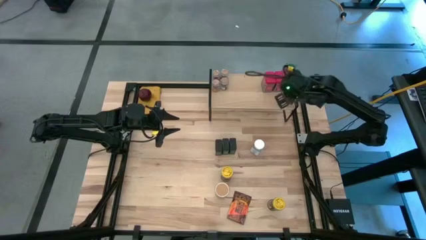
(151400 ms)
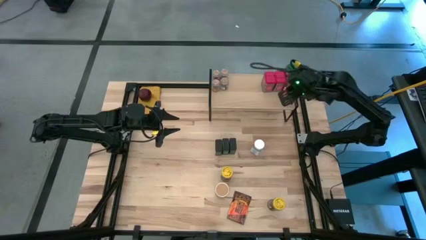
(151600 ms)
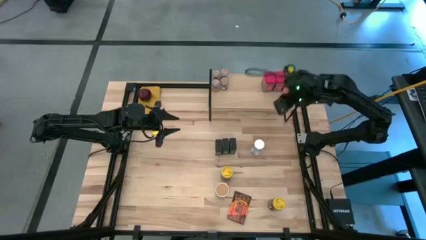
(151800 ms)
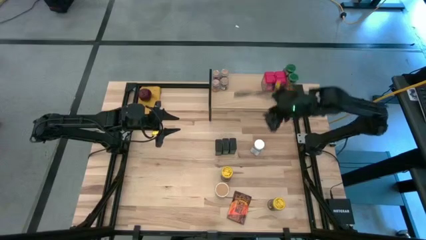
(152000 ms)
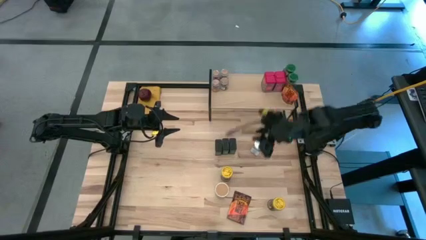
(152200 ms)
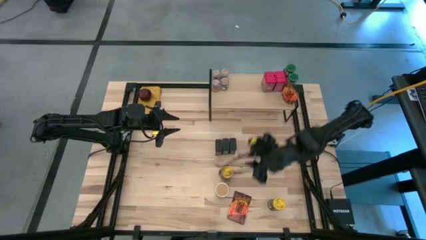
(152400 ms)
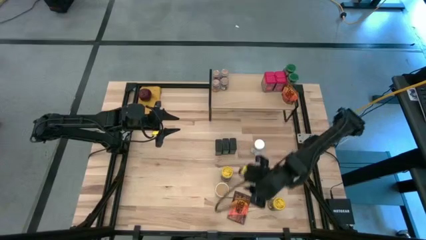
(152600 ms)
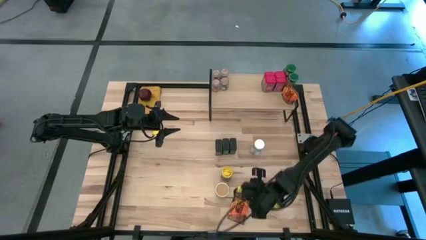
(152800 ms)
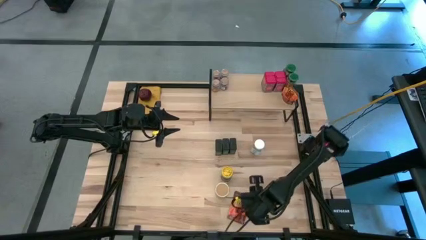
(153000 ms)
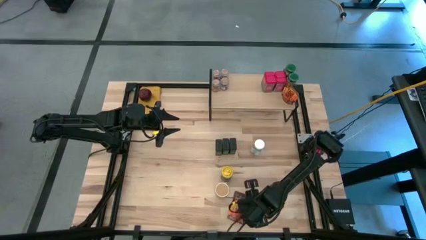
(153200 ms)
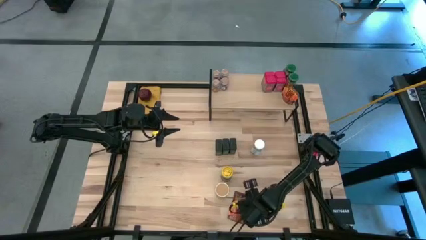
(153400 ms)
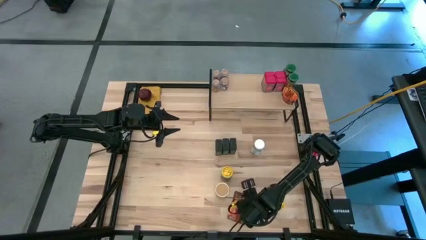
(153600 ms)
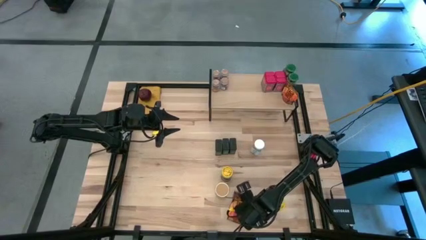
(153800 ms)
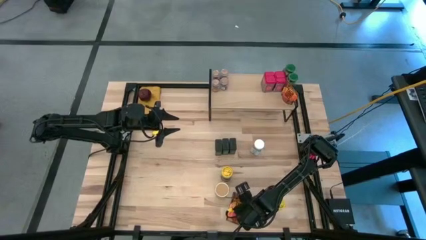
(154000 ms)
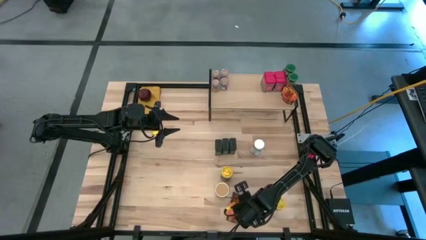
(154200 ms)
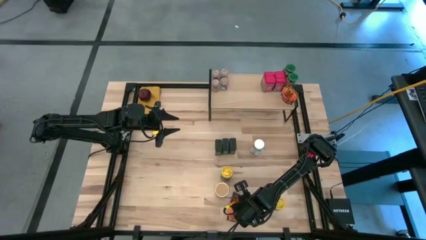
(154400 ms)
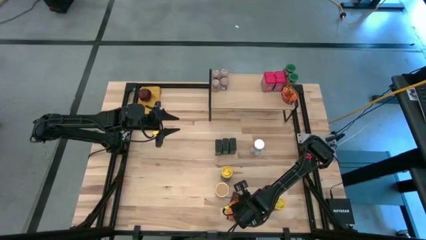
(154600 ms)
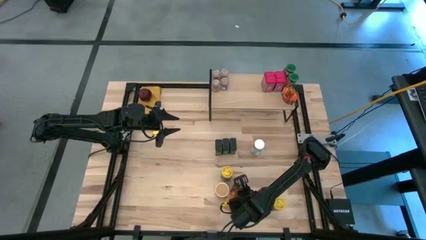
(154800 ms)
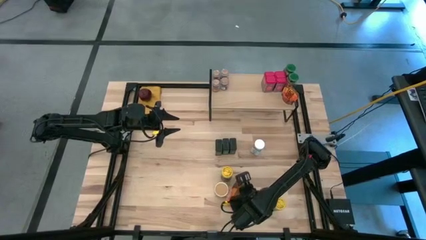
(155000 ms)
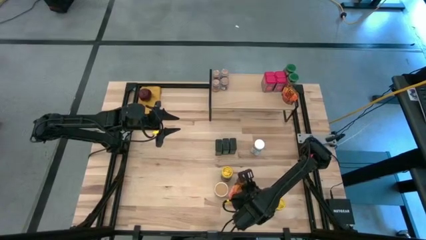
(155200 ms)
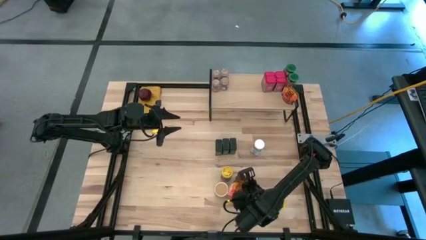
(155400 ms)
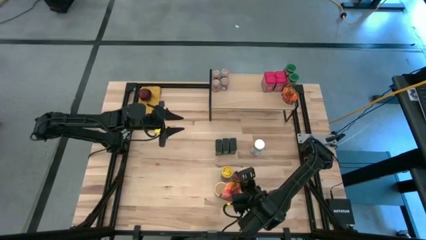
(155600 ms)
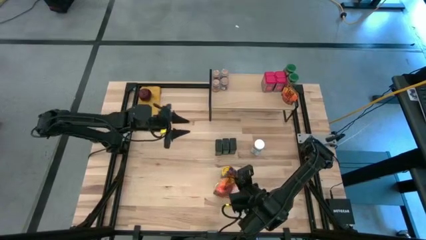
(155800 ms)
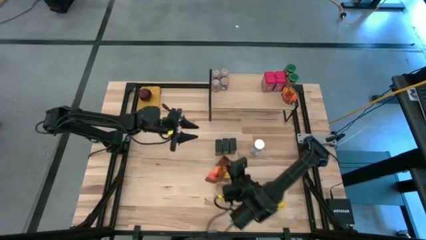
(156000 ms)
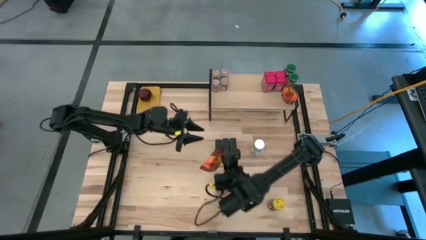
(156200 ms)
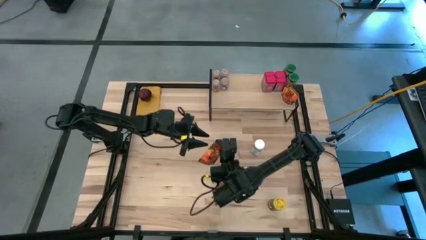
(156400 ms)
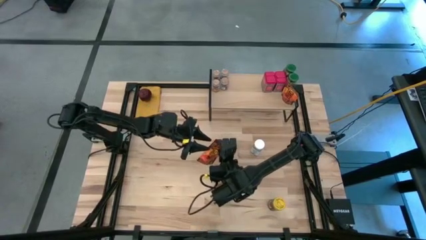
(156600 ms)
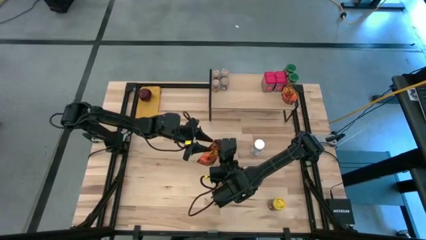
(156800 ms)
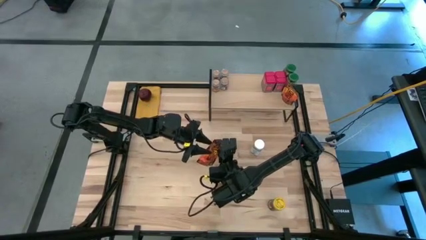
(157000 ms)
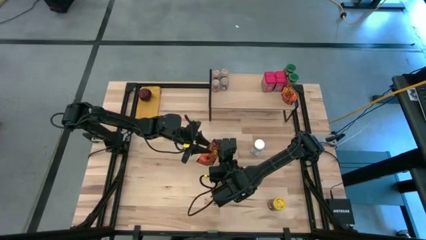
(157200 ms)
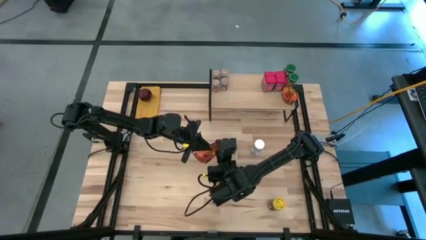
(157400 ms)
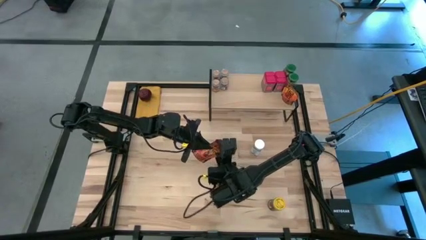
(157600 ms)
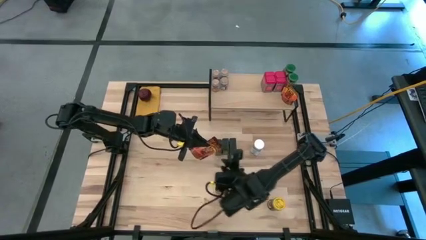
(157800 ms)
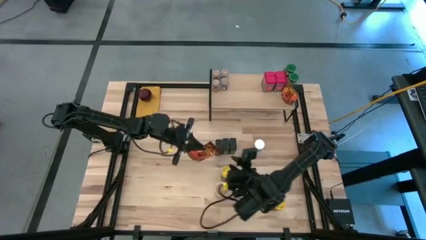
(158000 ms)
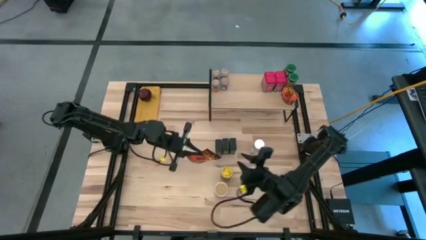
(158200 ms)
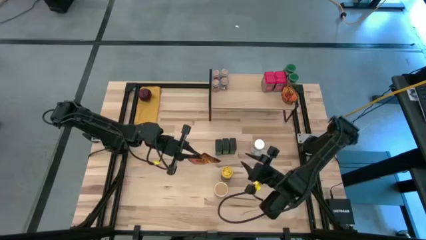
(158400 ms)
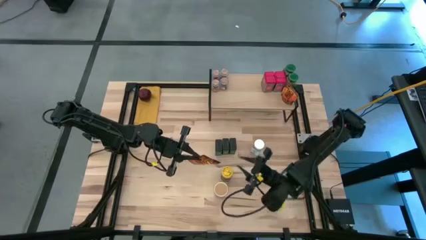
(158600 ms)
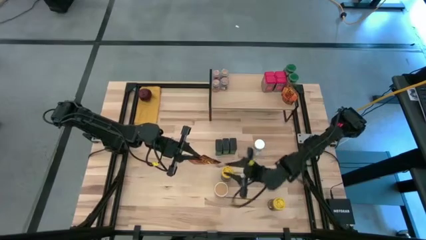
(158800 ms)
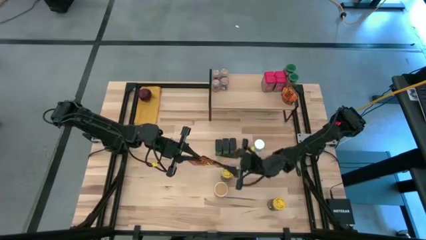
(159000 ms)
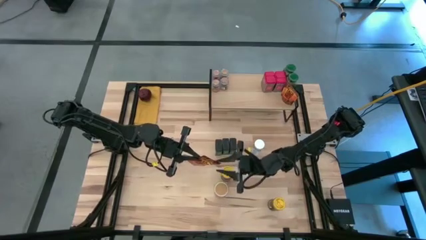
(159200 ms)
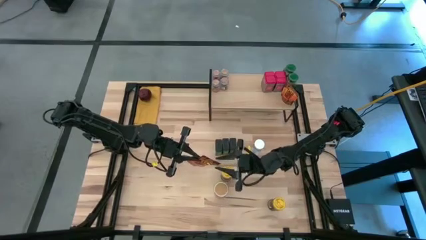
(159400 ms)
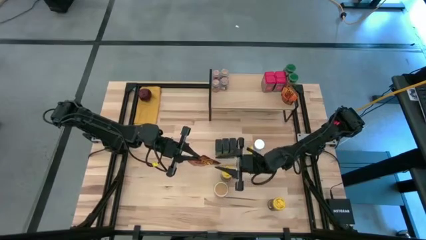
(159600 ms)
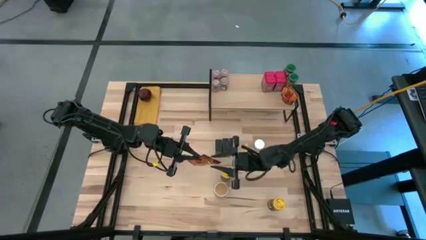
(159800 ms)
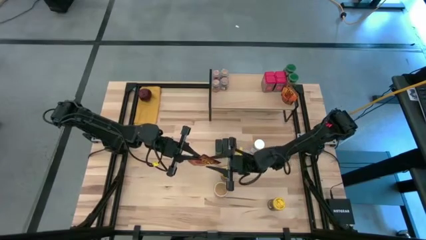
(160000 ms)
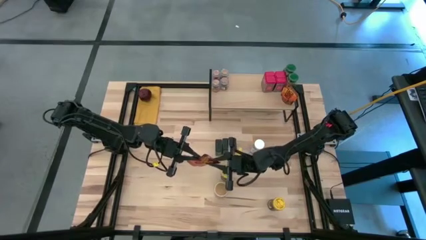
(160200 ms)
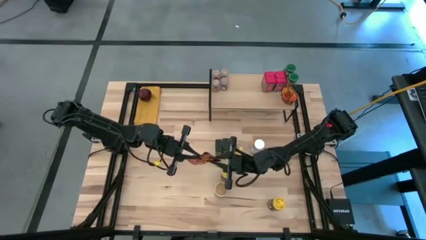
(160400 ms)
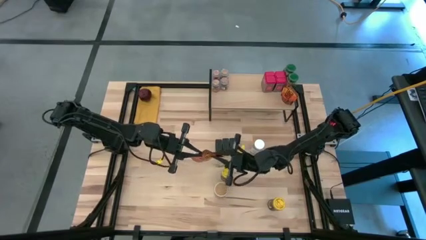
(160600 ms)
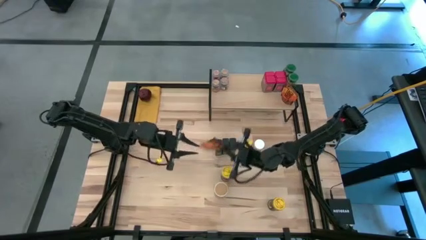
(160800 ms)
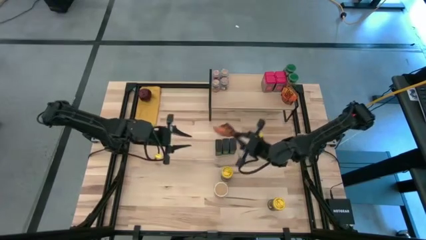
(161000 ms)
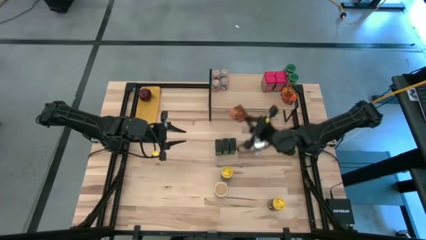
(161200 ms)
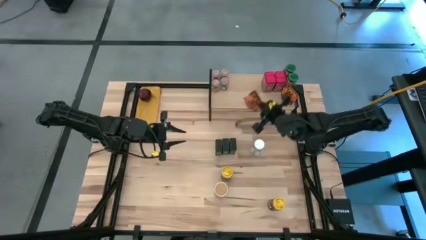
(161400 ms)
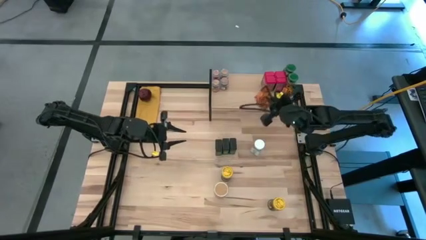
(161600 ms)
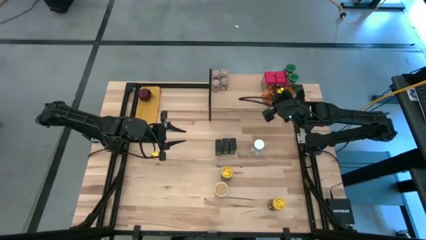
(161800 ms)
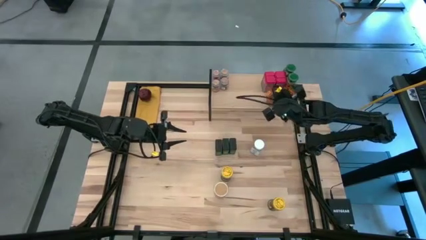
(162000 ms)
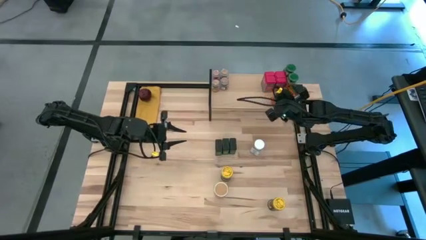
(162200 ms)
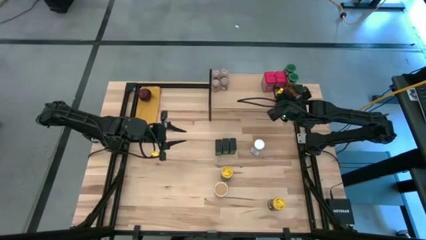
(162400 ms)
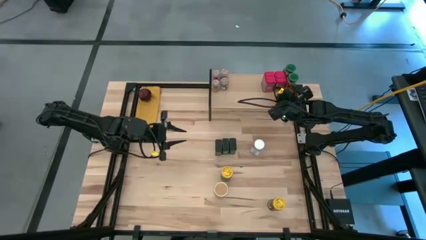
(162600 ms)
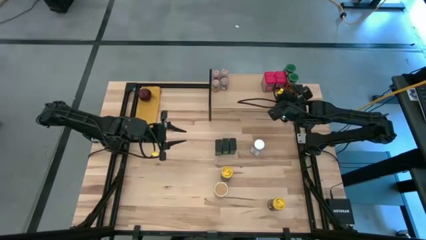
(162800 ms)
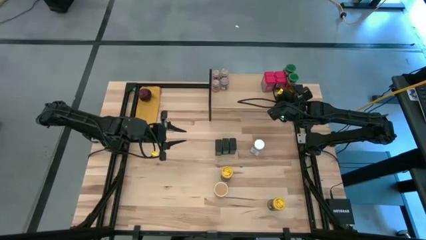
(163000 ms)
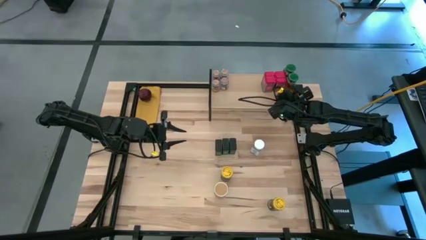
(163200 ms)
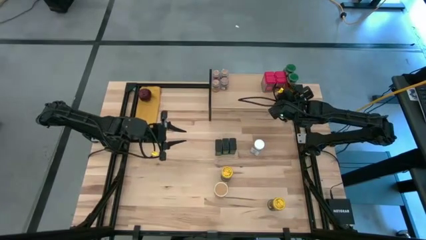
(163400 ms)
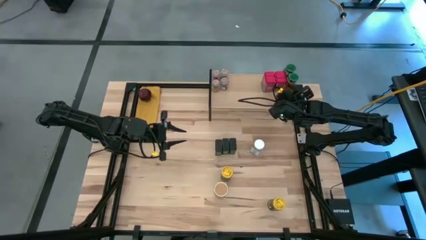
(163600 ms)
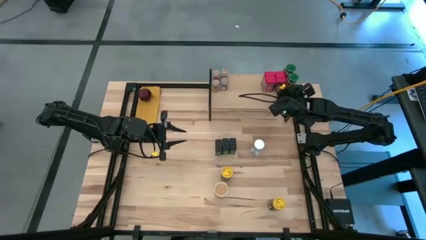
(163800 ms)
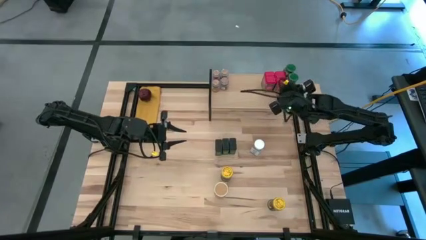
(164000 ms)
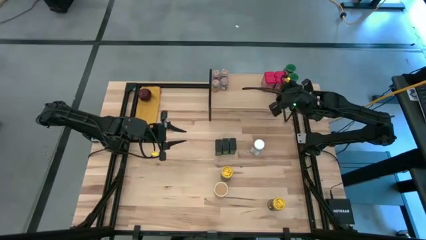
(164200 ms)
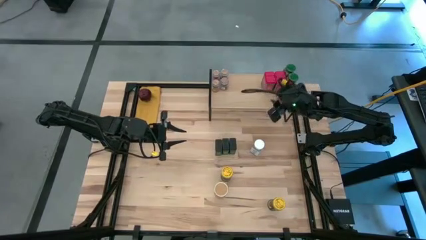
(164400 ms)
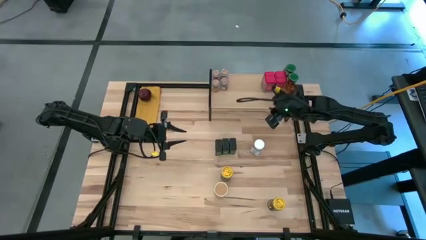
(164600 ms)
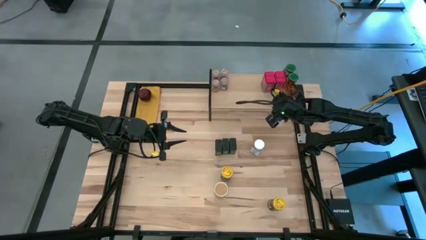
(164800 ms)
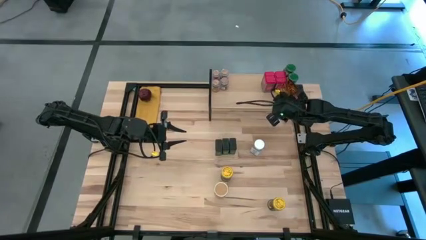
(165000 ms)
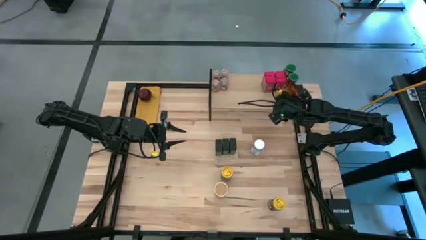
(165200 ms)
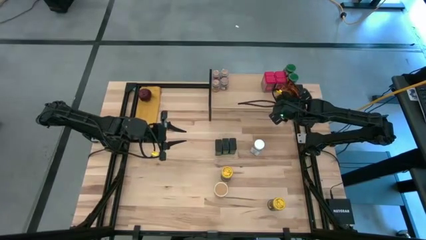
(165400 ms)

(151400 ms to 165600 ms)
Task: Shelf spices
Put the orange seasoning bag on the shelf and align it with the other orange seasoning bag
